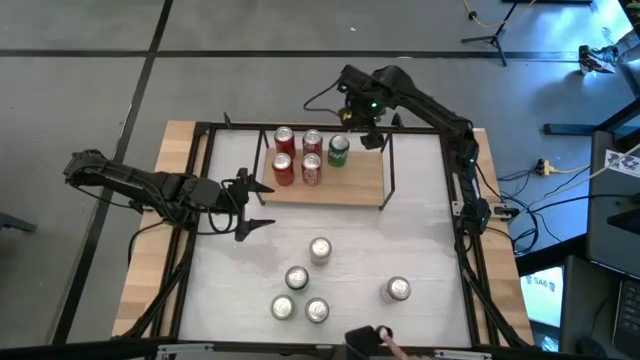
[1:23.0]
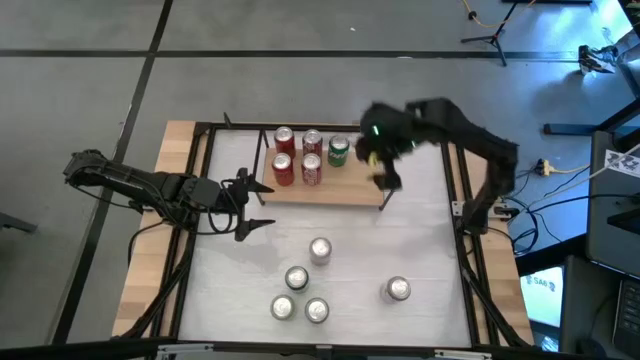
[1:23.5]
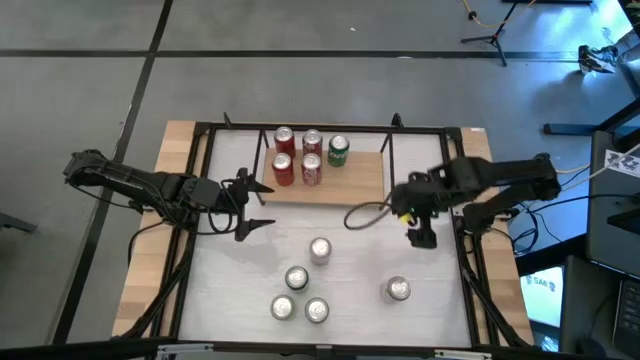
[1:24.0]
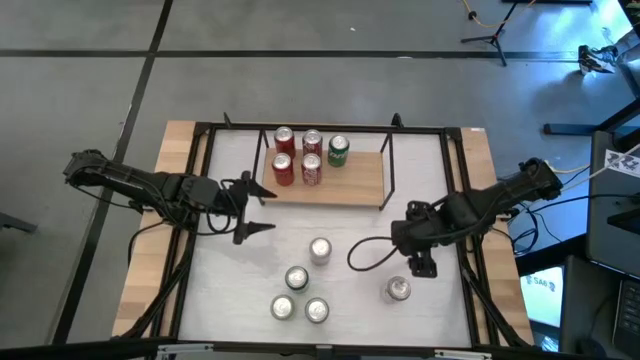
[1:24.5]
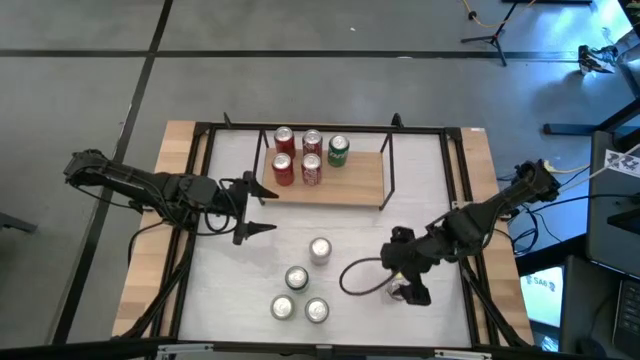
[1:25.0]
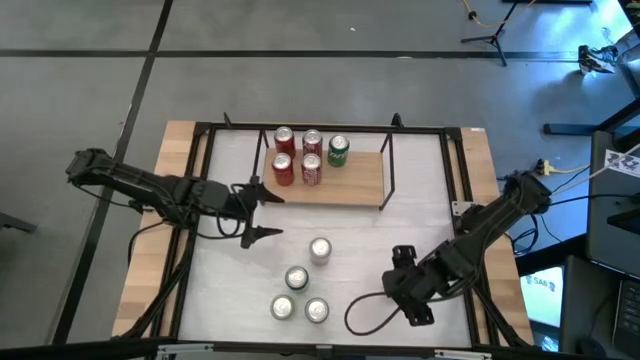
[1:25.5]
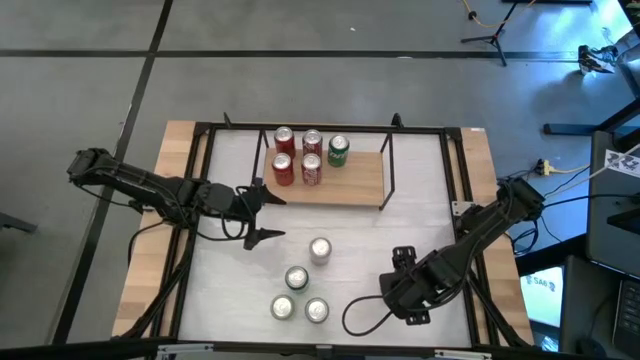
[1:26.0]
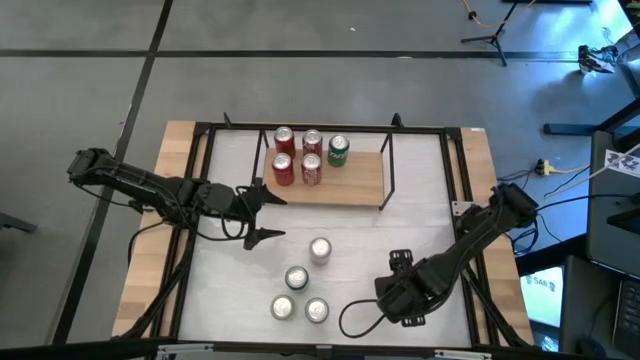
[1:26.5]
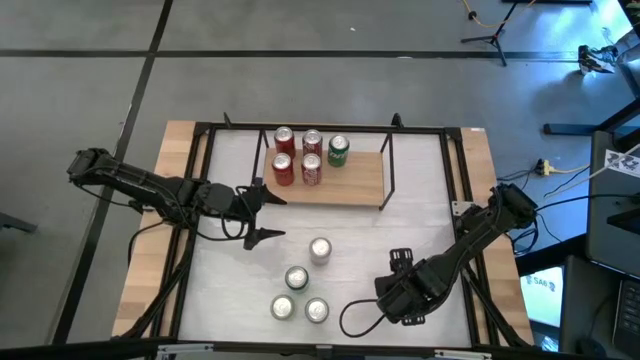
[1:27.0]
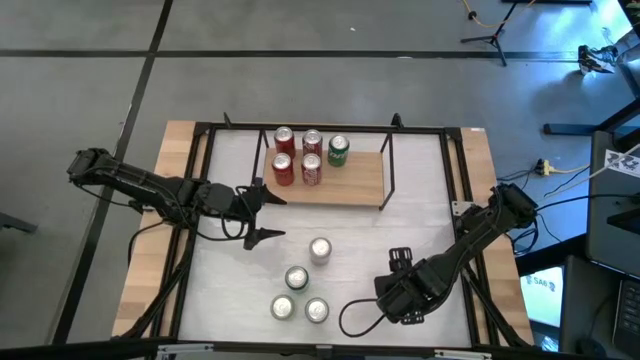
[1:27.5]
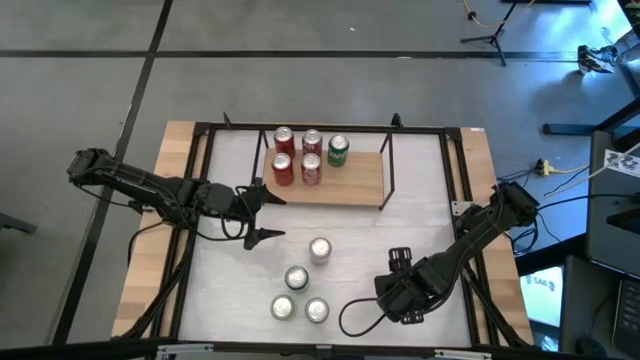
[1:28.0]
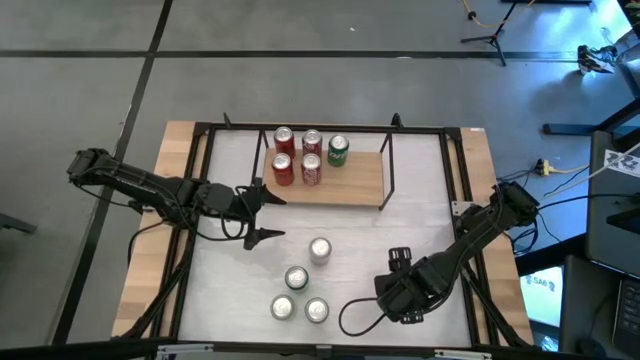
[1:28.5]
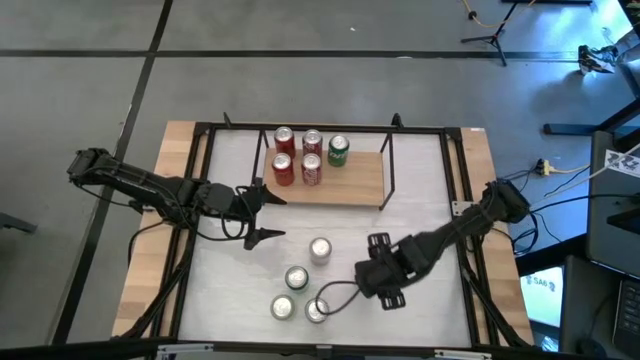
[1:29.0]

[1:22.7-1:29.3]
Task: Place canned beverage on shelf
Put the right silver soda can on the shelf

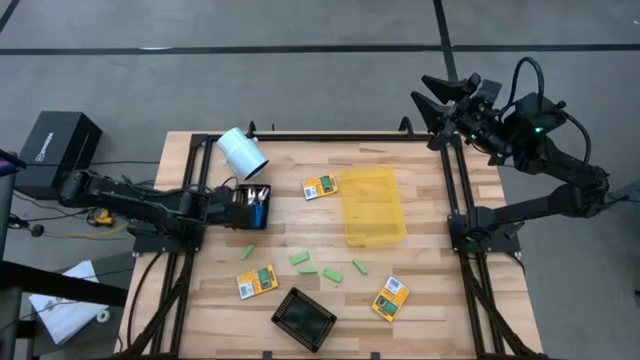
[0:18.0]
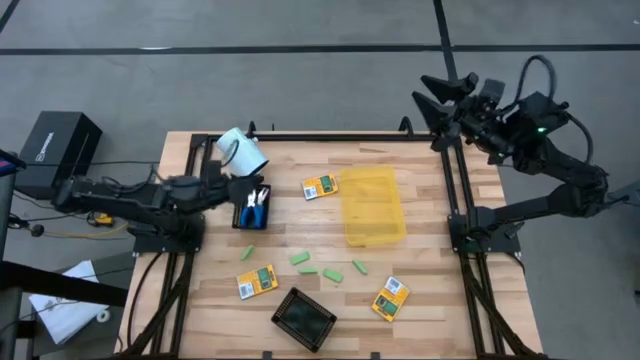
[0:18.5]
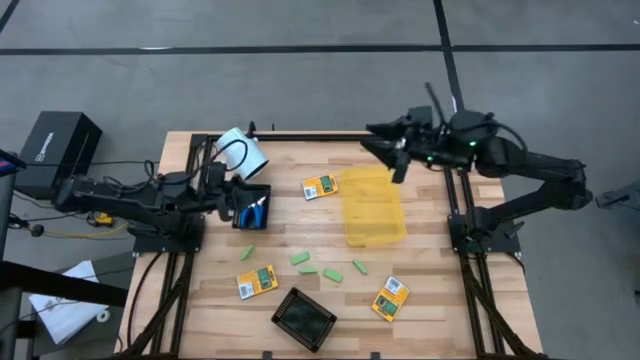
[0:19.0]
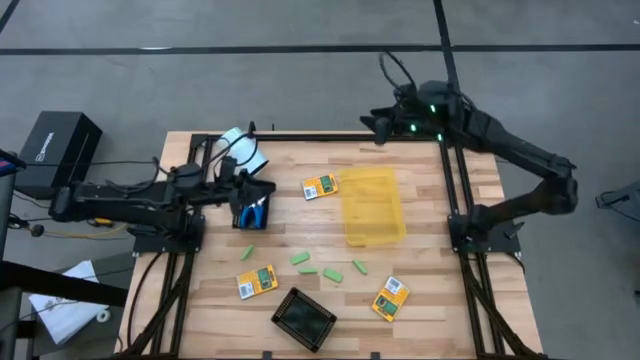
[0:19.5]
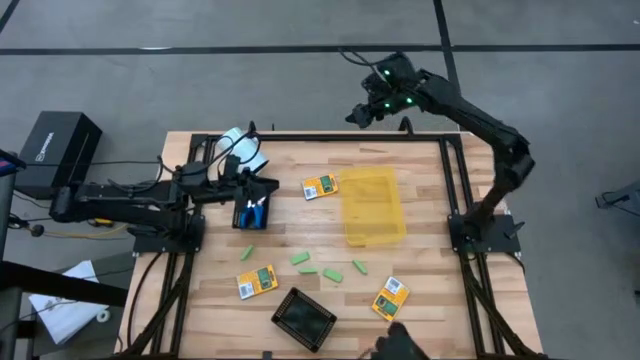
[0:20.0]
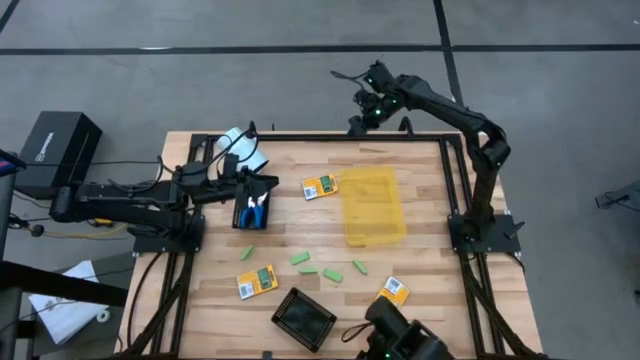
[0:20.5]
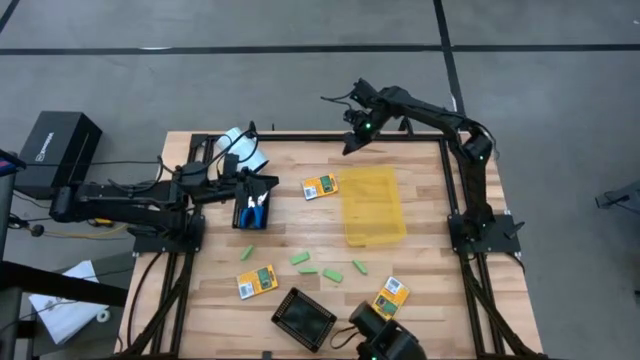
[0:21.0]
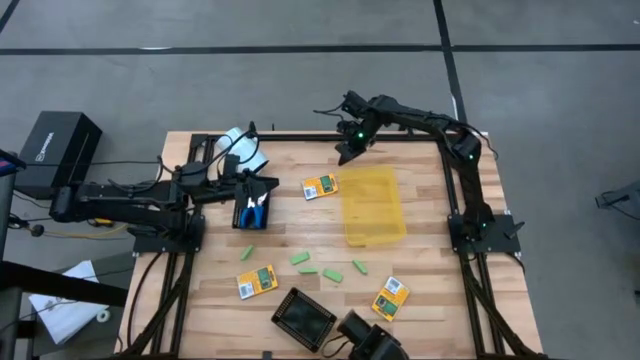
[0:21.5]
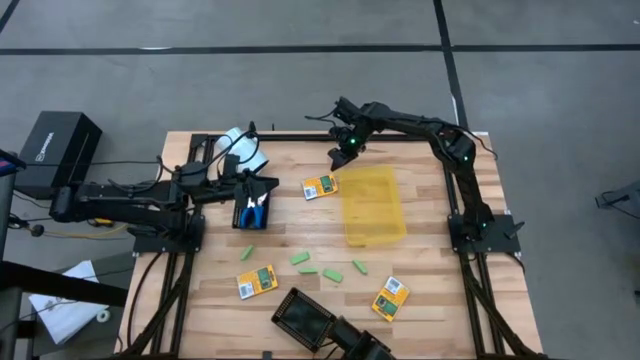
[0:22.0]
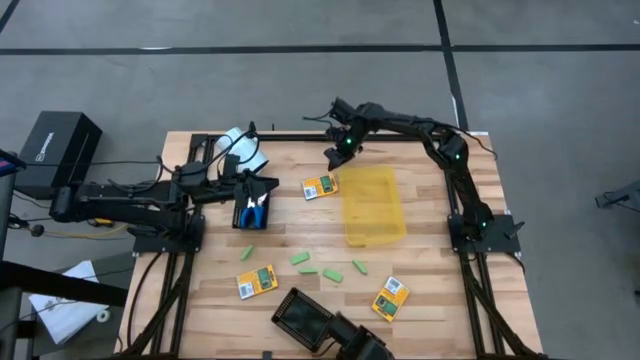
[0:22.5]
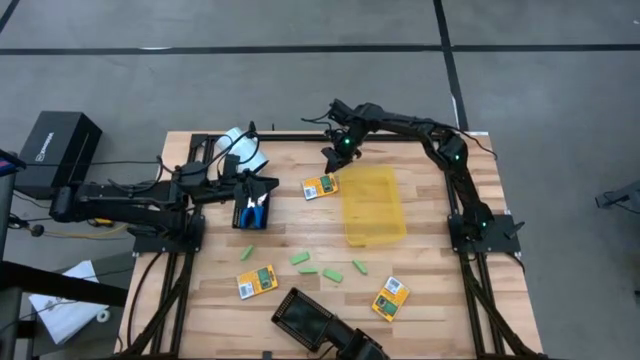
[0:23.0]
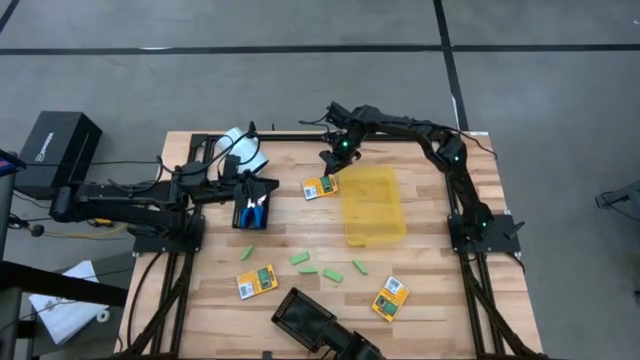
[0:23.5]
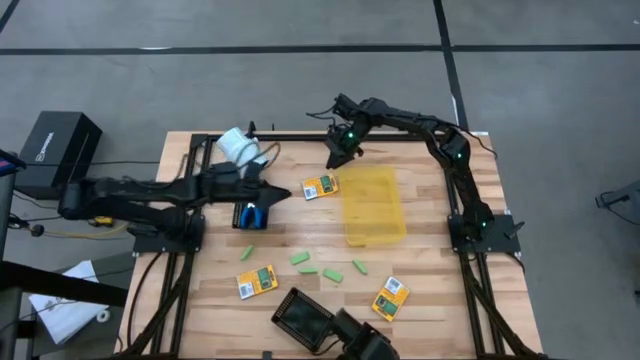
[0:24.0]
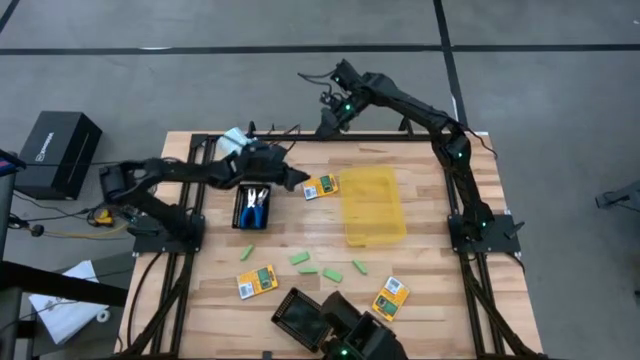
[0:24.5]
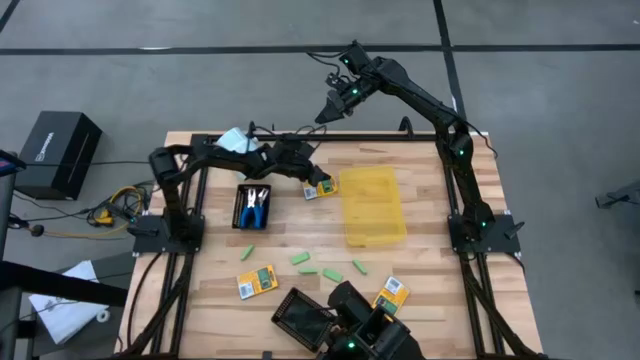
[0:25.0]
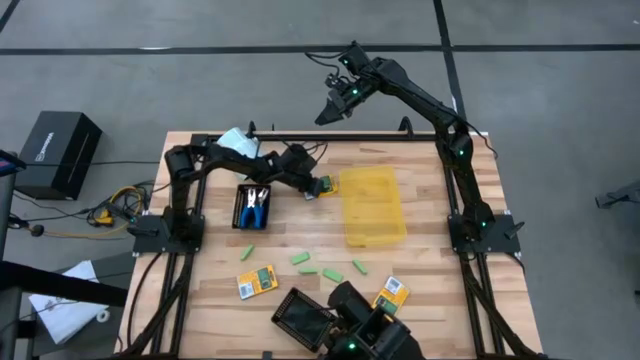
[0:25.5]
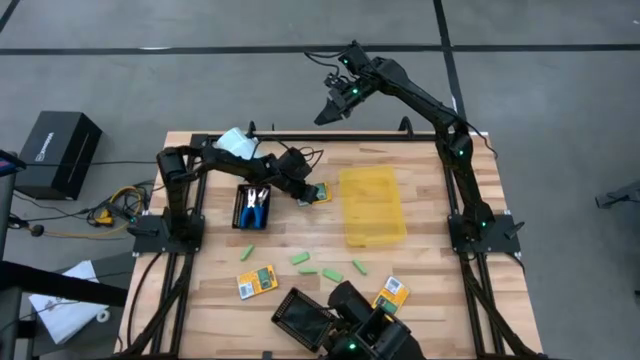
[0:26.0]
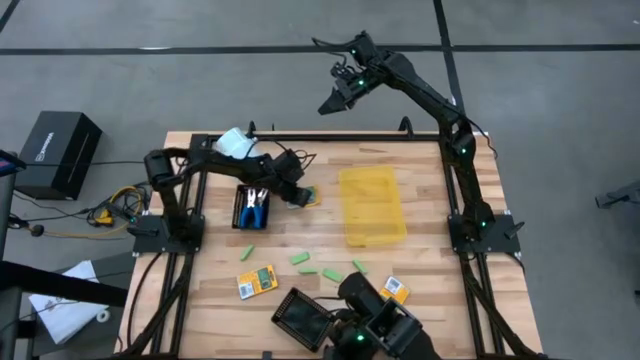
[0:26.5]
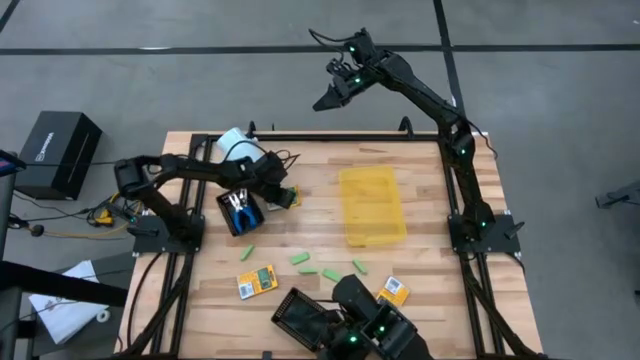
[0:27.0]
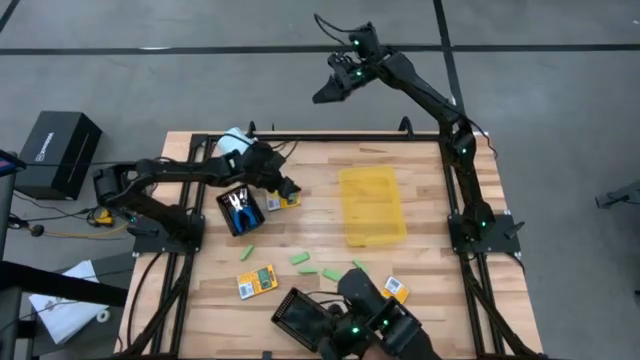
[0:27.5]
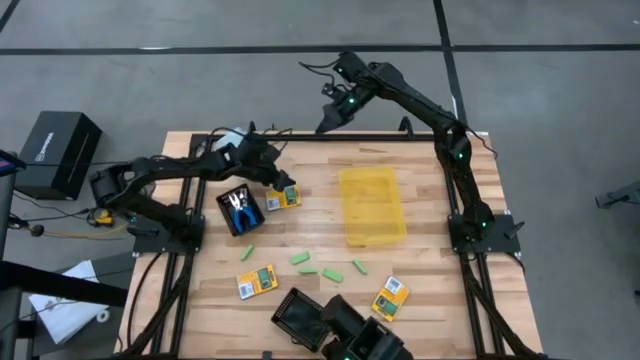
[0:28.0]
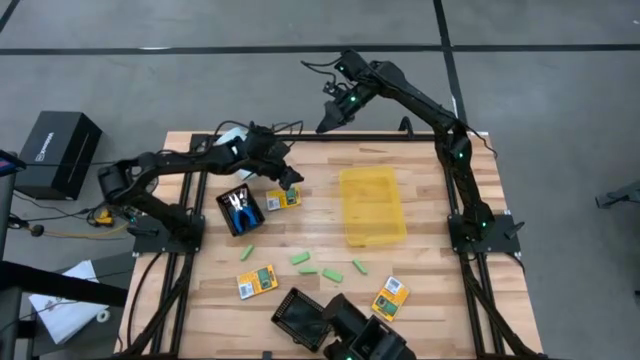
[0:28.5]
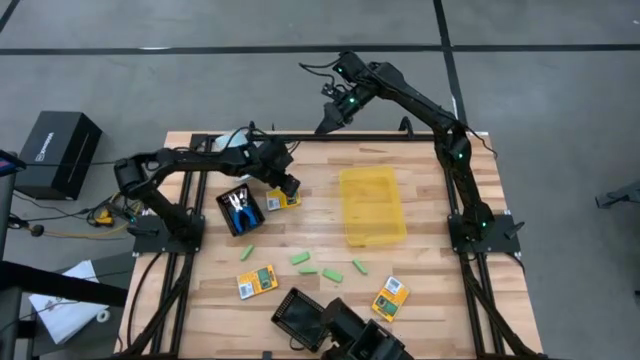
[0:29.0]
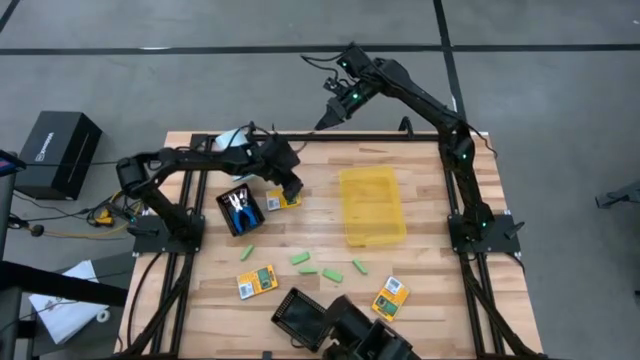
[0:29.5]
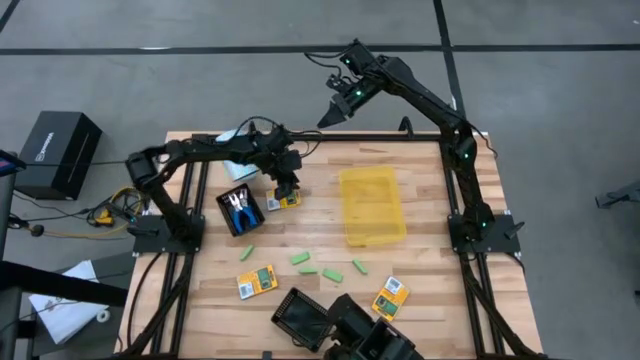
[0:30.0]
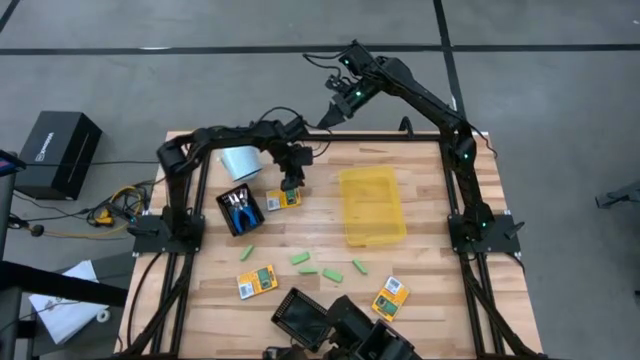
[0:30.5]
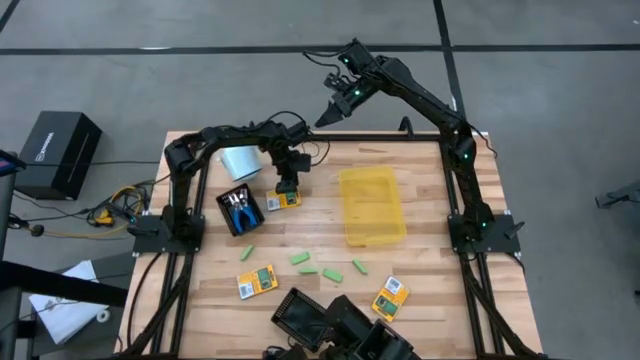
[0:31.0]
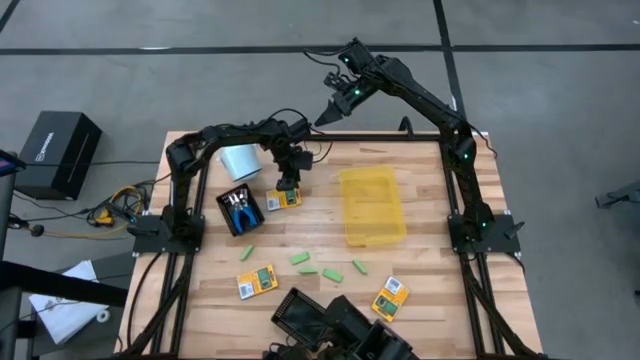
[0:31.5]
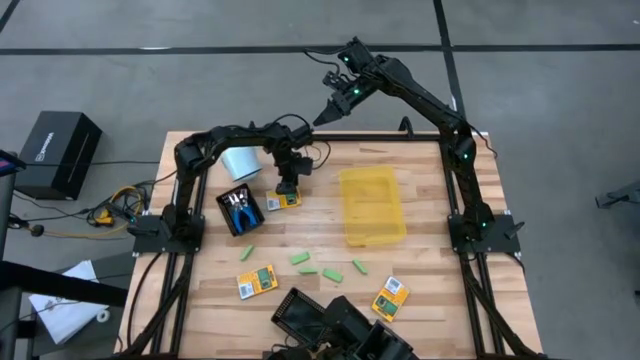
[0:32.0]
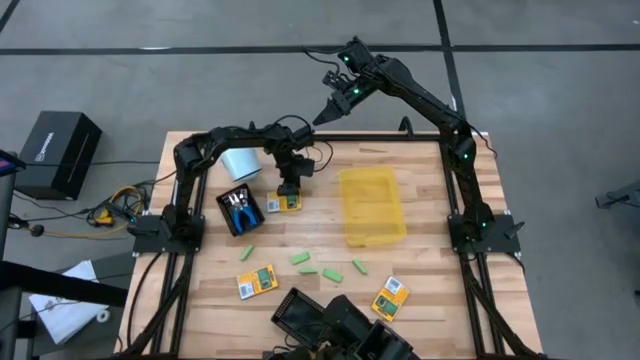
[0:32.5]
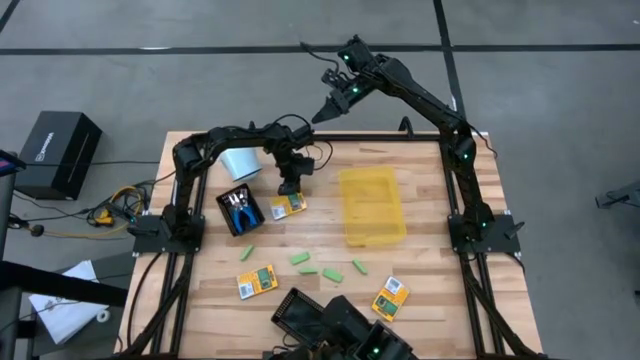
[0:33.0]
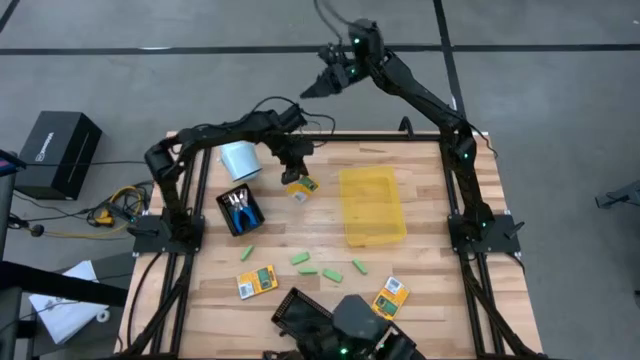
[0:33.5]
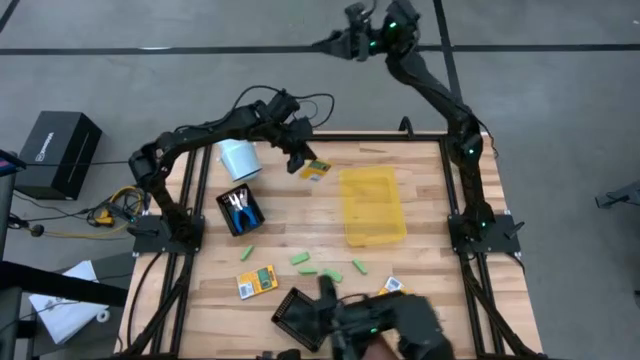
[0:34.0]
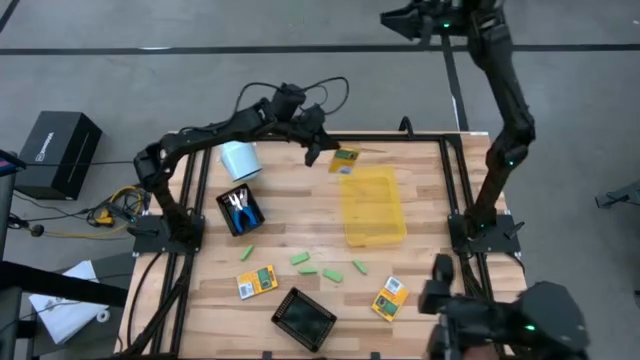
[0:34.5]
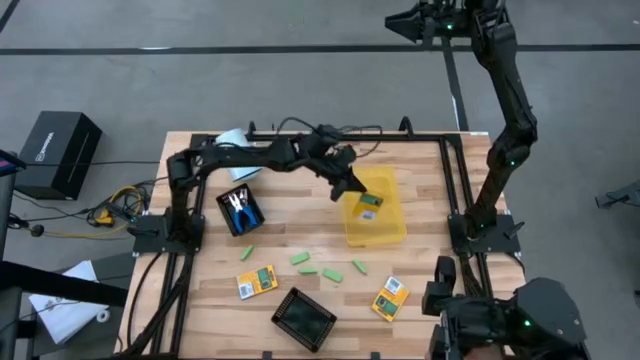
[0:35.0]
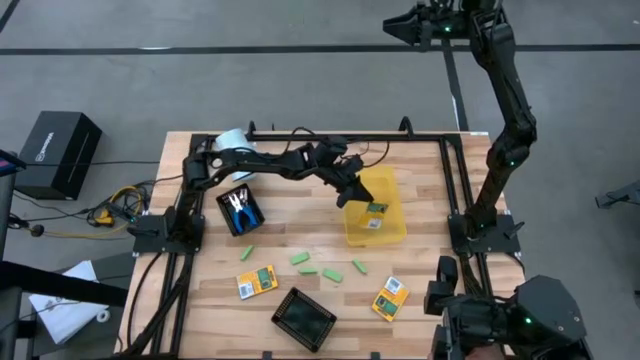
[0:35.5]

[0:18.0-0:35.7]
Task: Pick & Place School Supplies
Put the top crayon box into the yellow bin
